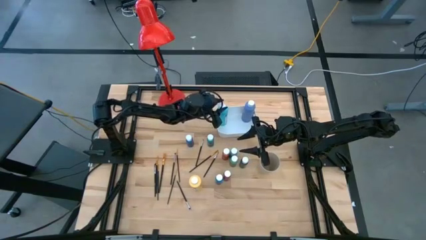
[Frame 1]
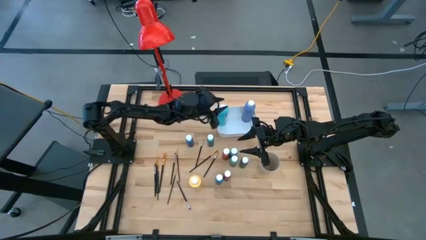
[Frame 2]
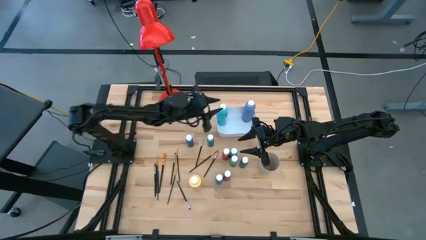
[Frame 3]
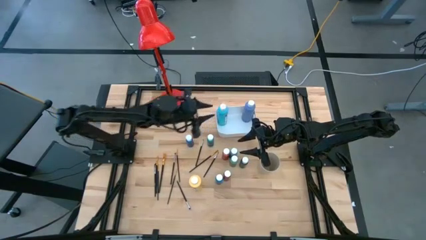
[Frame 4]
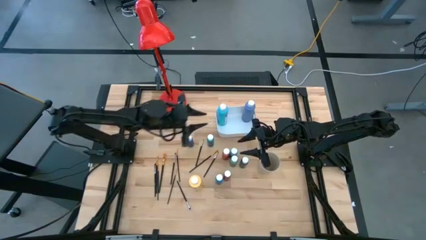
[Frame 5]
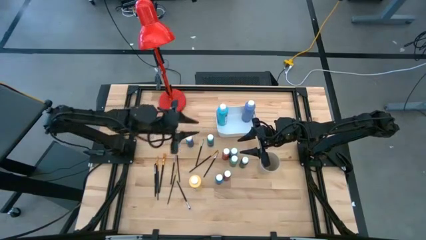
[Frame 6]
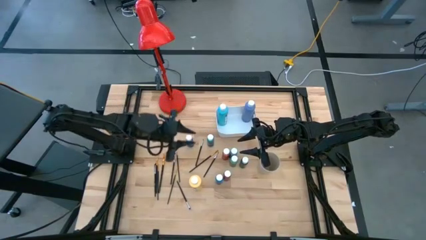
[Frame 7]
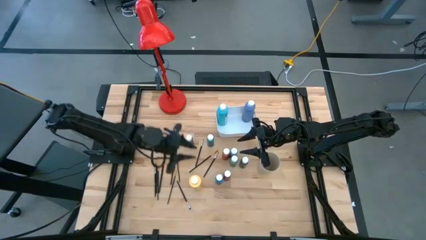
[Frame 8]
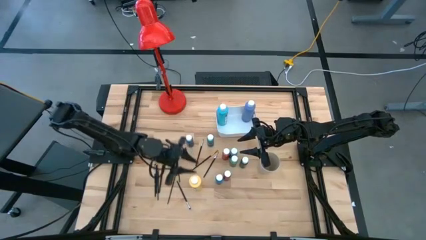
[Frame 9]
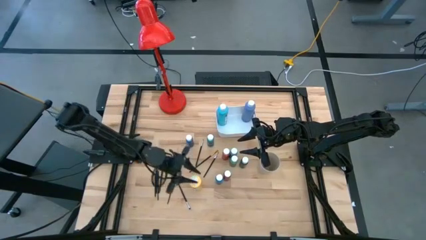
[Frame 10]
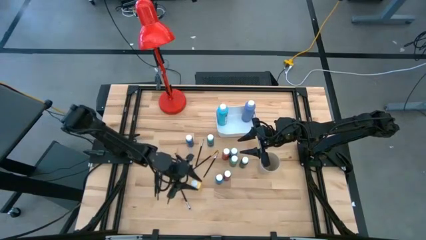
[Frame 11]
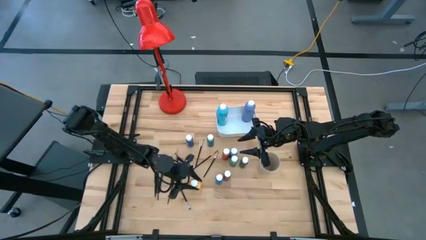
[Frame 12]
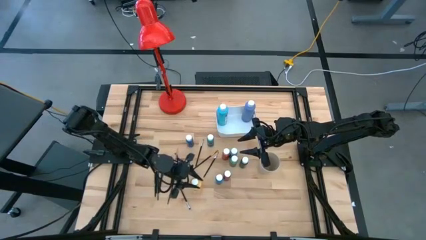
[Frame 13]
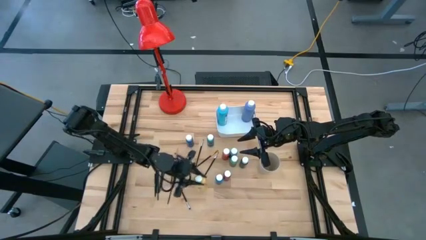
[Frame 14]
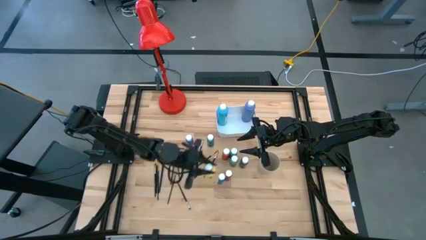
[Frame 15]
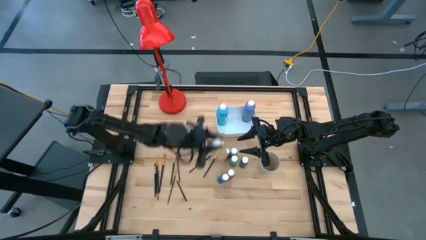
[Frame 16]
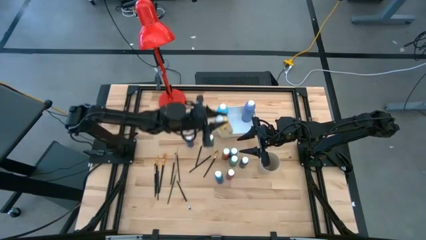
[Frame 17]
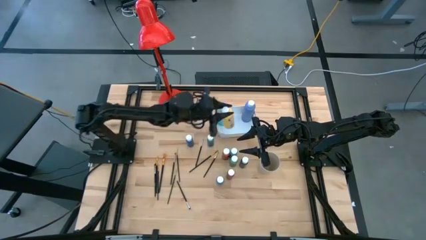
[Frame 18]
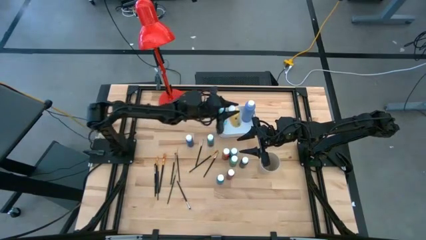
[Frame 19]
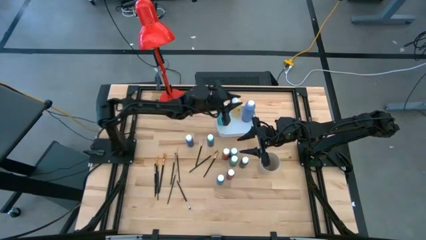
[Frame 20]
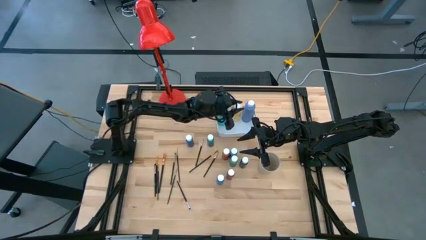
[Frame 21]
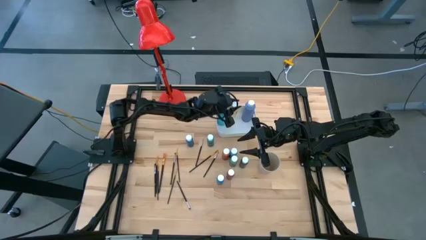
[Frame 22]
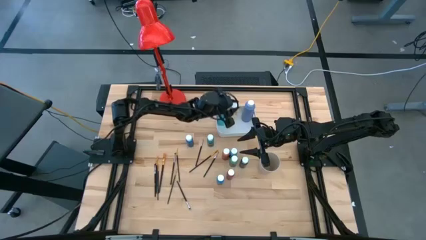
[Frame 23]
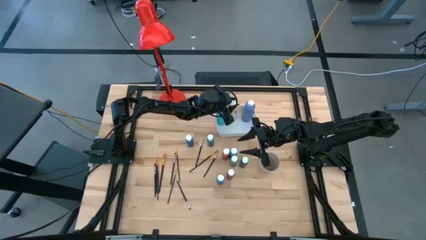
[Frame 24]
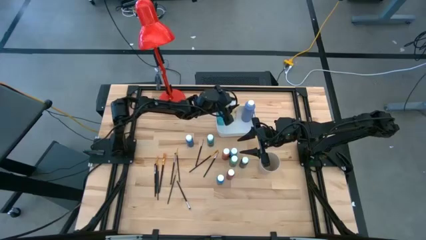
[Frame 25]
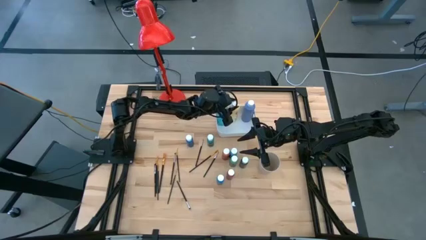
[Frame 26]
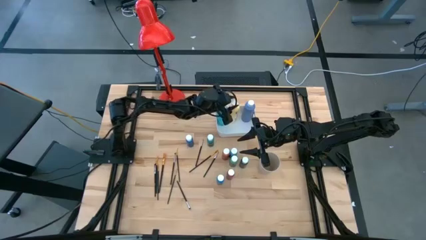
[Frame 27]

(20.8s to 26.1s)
Task: Pick & Place Paint Supplies
Put the yellow matte acrylic craft paint into the white bin

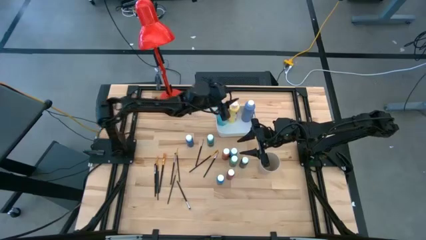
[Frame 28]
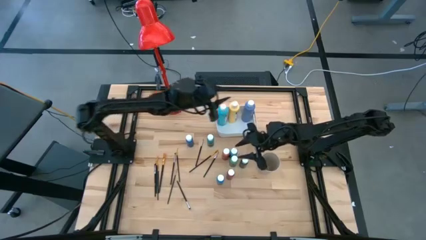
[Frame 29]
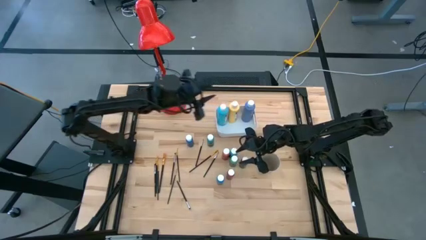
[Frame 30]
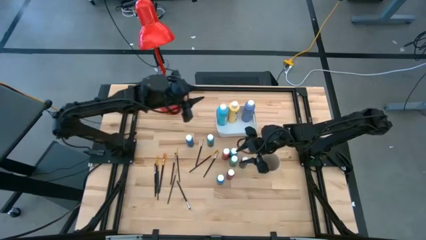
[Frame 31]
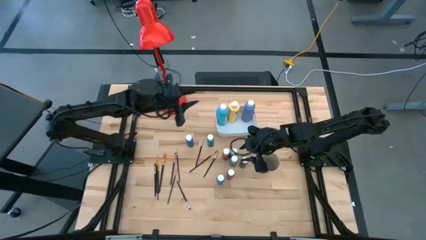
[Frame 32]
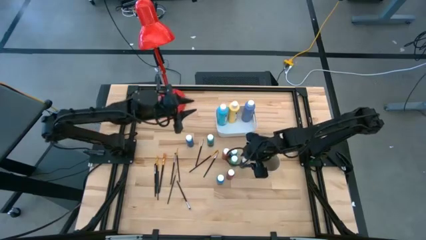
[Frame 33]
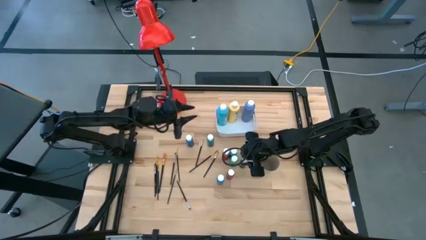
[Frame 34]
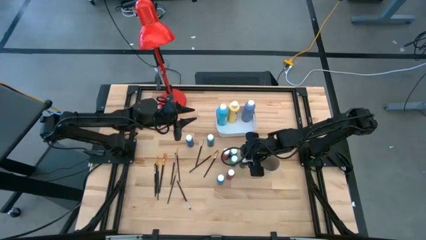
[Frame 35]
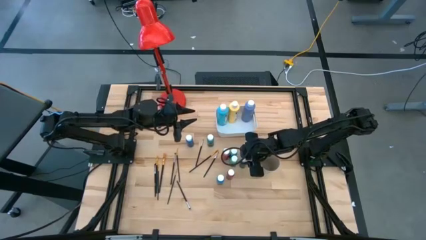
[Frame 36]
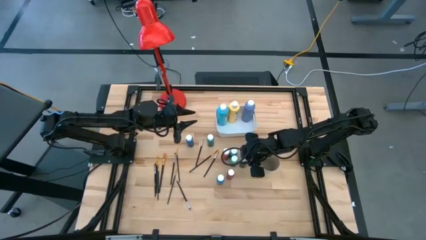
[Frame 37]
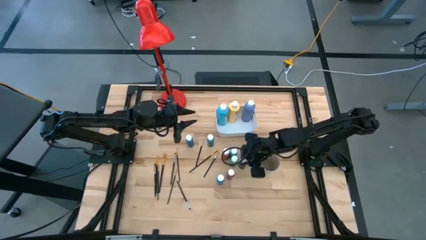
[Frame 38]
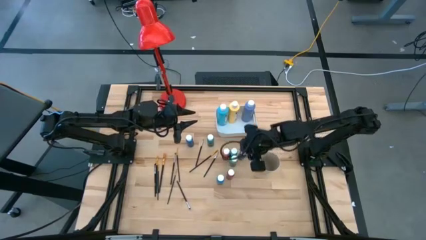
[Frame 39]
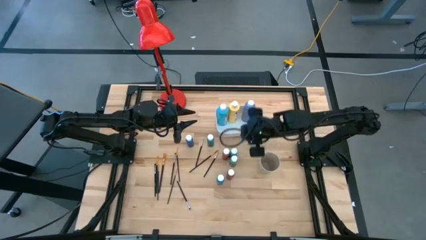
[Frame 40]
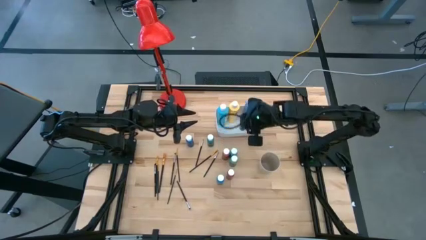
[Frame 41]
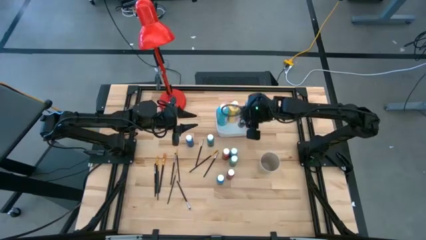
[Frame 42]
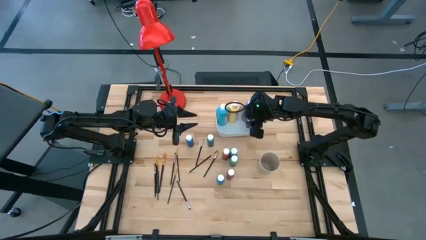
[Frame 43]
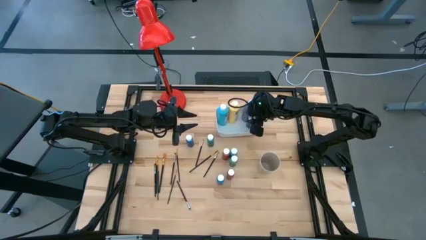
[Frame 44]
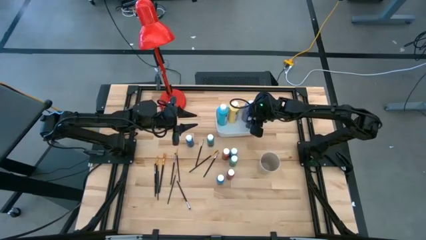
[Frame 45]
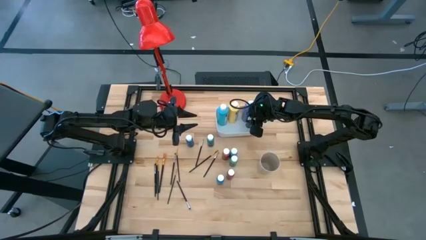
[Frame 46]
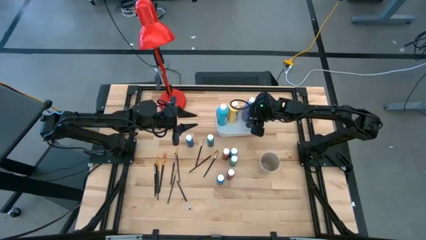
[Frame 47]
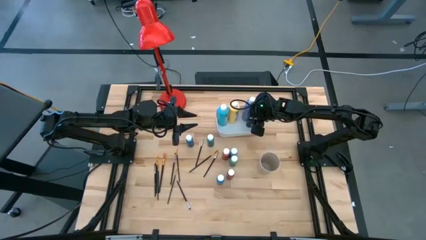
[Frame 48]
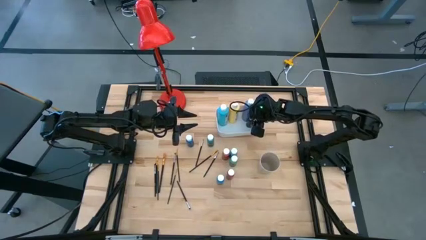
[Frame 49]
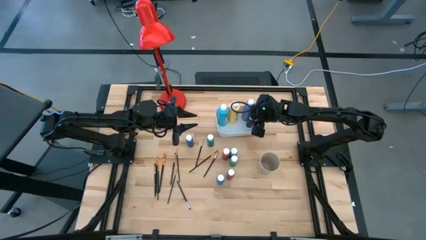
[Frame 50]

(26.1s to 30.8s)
Put the black matte acrylic craft paint into the white bin

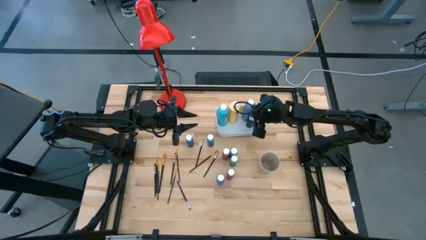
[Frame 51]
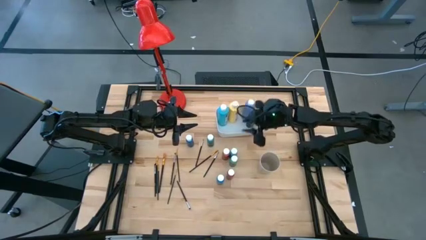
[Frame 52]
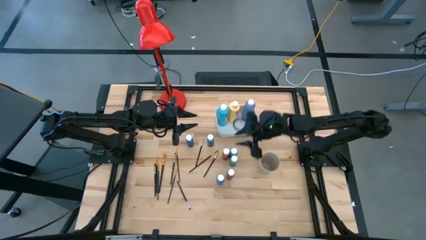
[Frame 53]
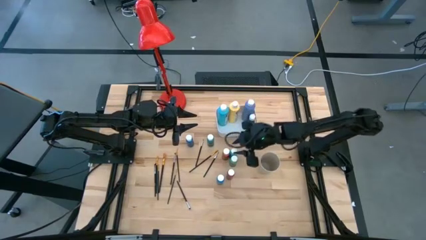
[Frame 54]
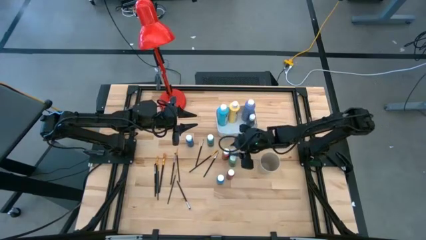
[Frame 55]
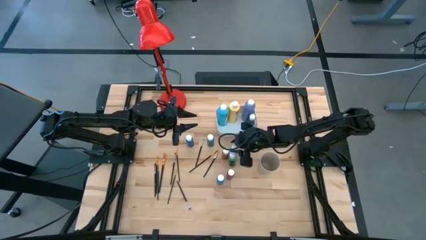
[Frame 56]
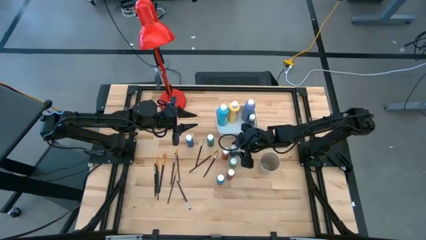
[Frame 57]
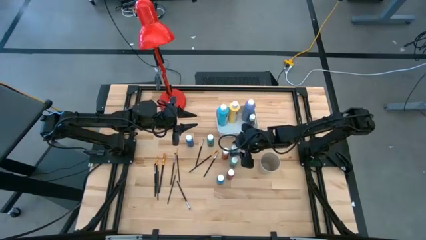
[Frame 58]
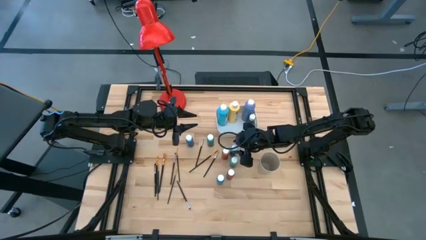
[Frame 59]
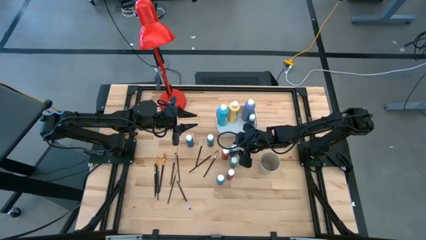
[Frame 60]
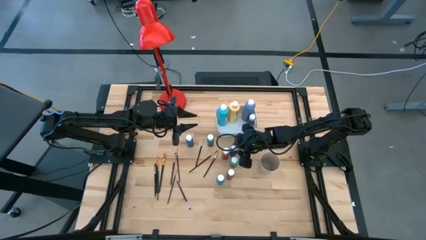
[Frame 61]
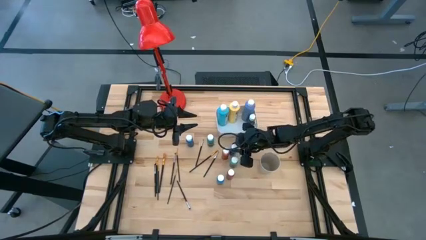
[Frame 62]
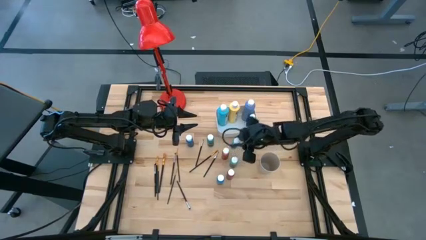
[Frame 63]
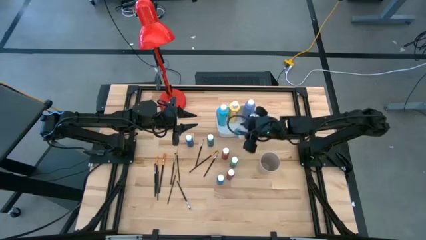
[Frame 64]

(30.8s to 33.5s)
Put the light blue matte acrylic craft paint into the white bin

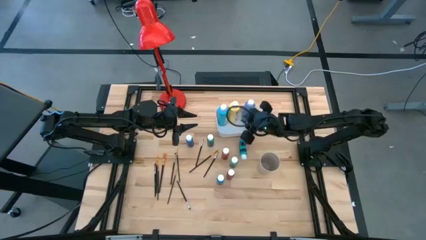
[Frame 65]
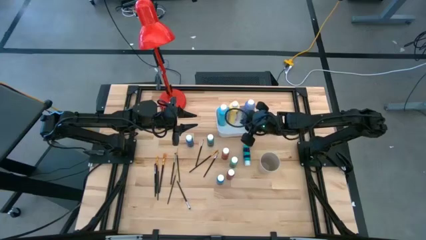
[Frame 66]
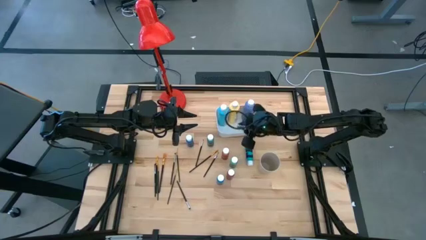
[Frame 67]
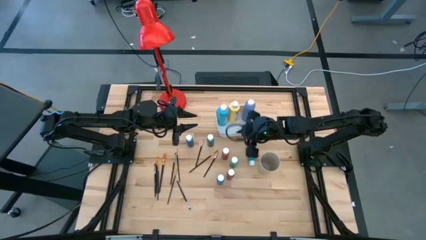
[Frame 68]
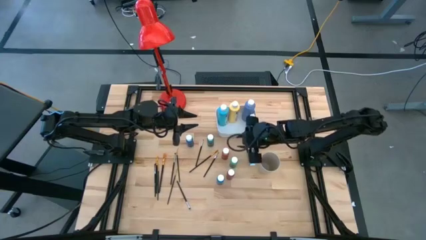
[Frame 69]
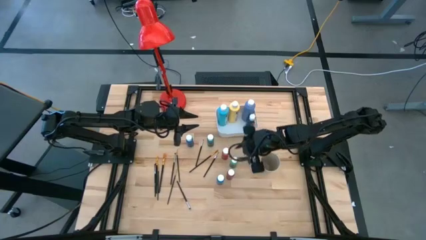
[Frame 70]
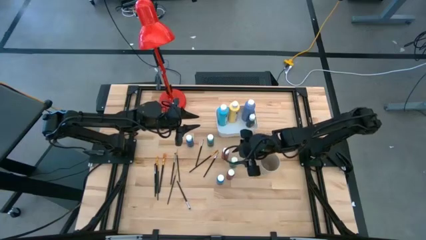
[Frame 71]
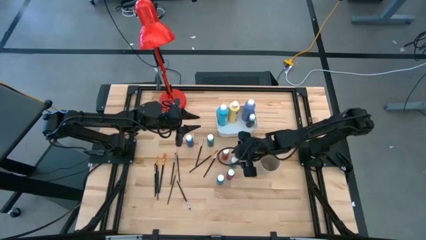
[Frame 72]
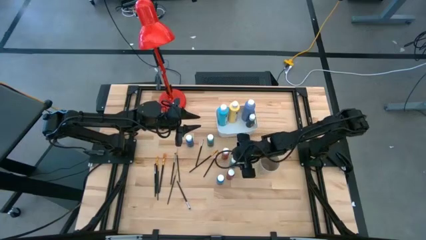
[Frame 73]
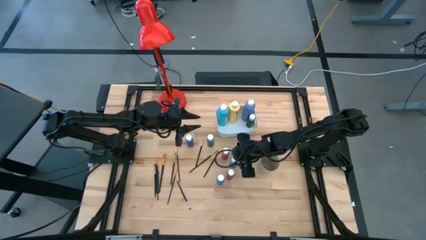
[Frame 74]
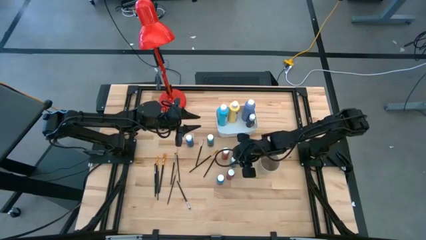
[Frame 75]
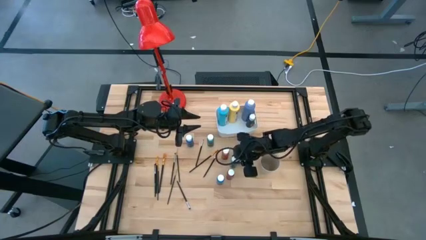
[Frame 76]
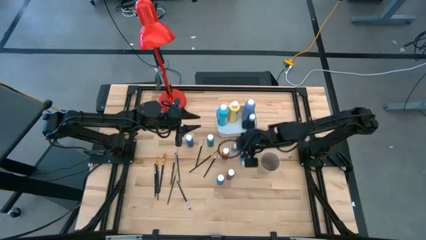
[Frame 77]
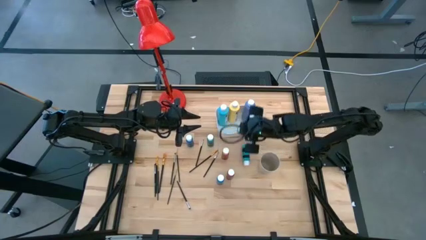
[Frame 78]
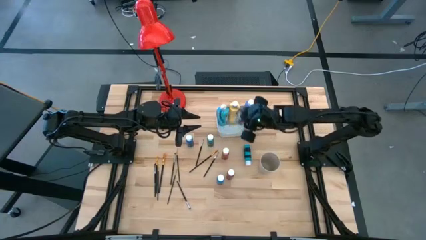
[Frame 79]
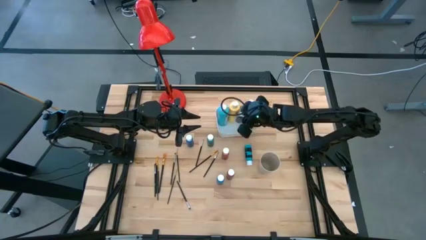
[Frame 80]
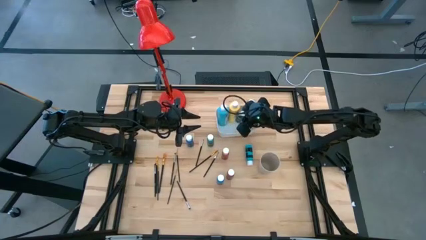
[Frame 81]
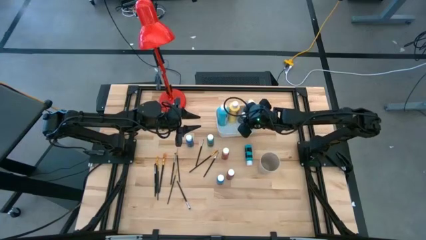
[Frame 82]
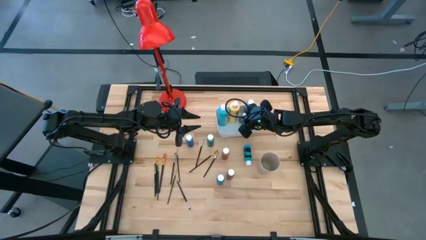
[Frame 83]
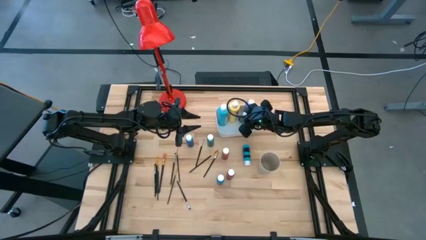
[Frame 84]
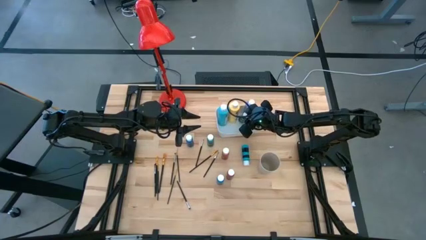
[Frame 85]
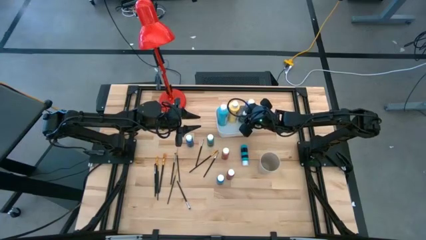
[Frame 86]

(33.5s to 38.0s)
Put the green matte acrylic craft paint into the white bin
